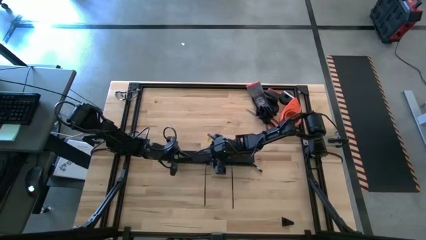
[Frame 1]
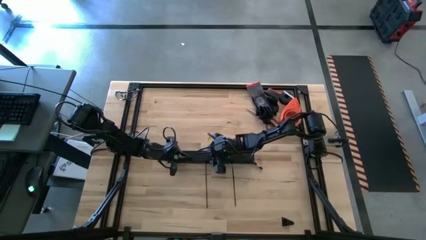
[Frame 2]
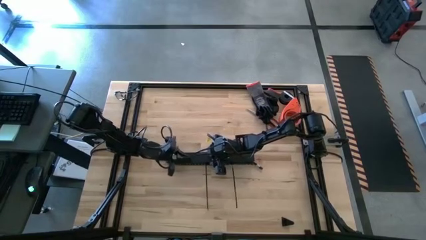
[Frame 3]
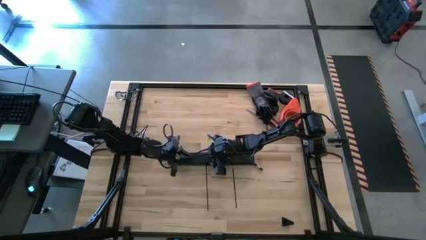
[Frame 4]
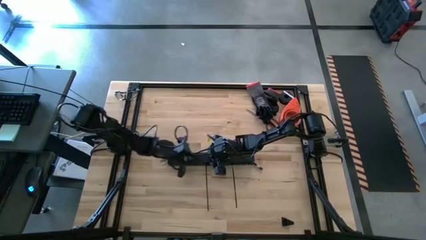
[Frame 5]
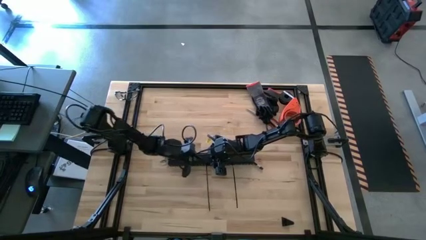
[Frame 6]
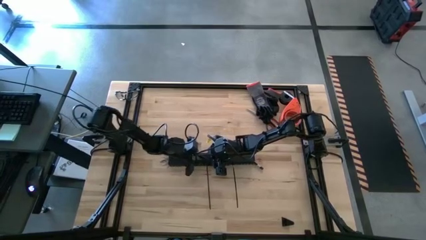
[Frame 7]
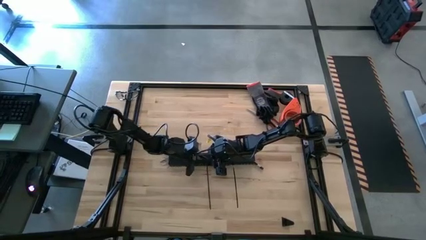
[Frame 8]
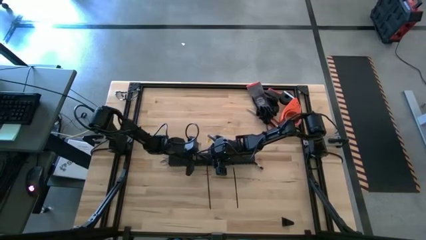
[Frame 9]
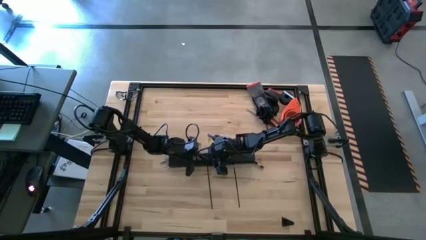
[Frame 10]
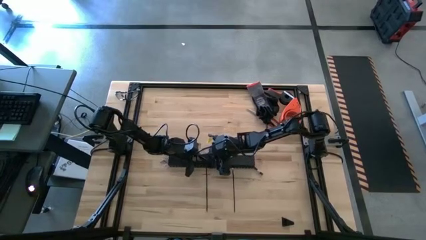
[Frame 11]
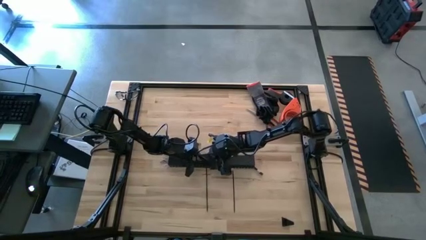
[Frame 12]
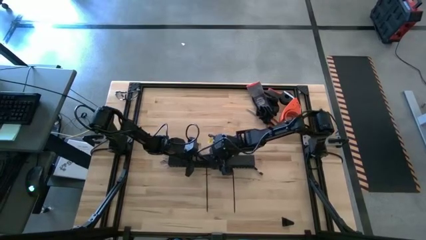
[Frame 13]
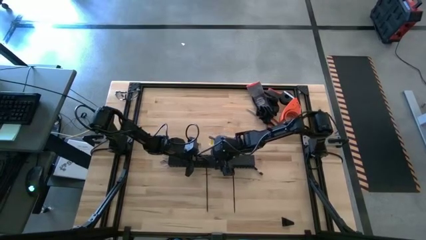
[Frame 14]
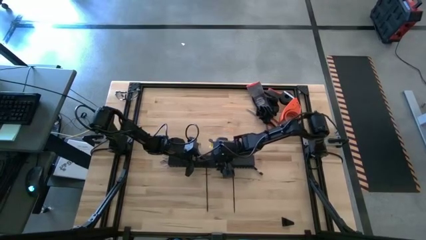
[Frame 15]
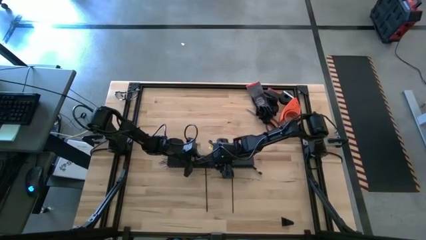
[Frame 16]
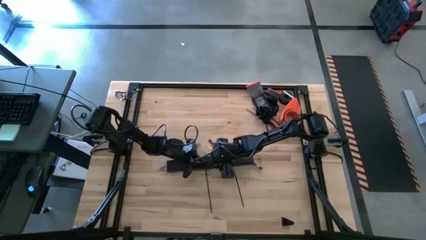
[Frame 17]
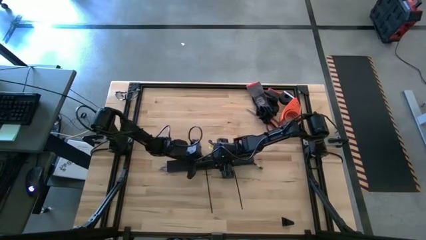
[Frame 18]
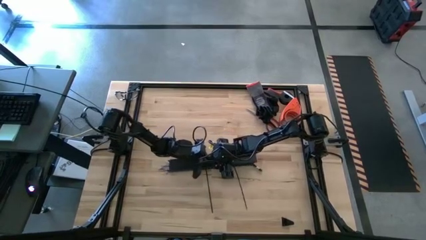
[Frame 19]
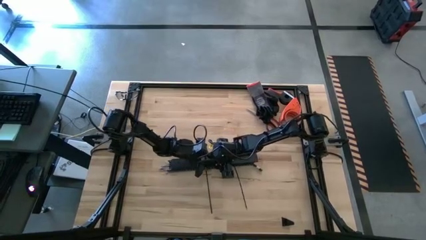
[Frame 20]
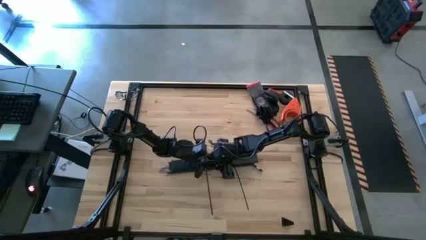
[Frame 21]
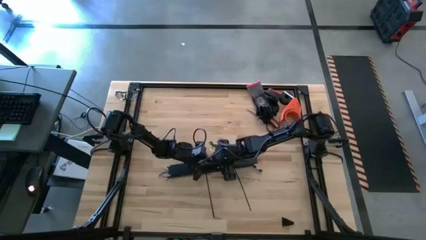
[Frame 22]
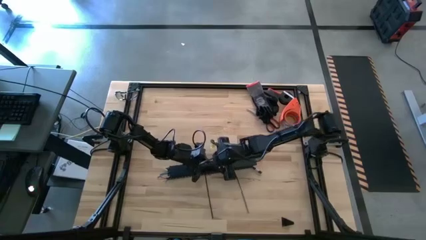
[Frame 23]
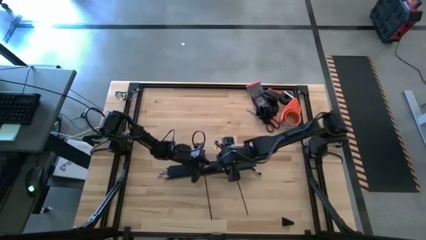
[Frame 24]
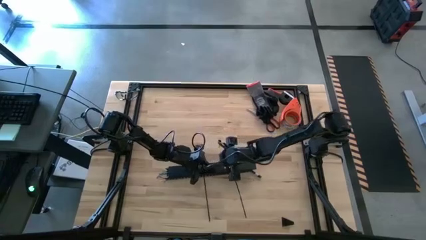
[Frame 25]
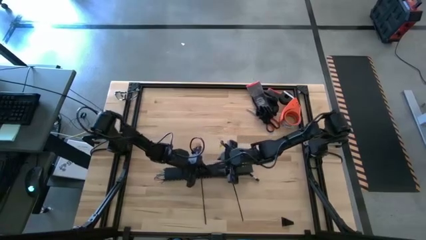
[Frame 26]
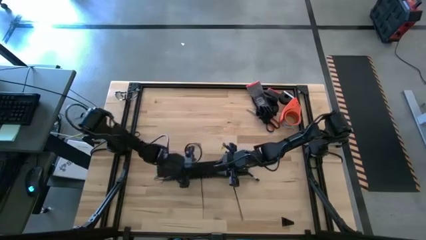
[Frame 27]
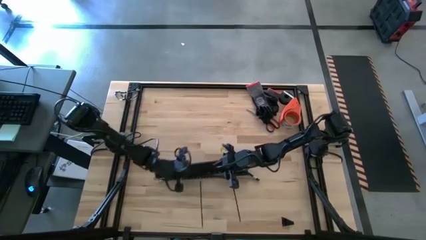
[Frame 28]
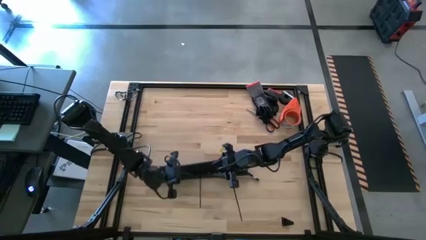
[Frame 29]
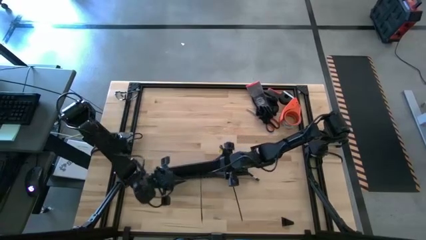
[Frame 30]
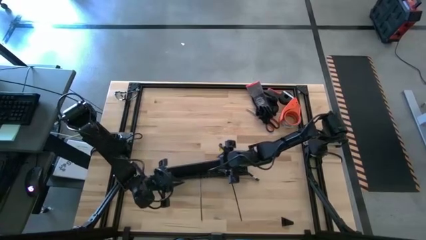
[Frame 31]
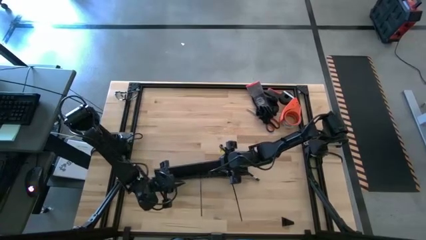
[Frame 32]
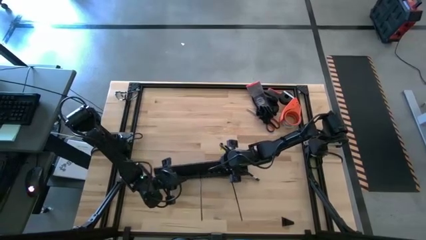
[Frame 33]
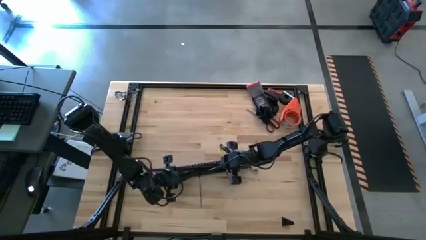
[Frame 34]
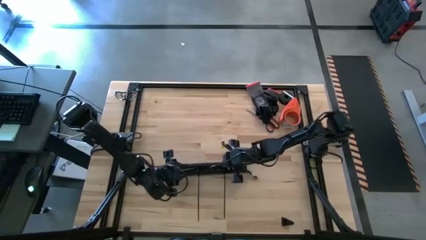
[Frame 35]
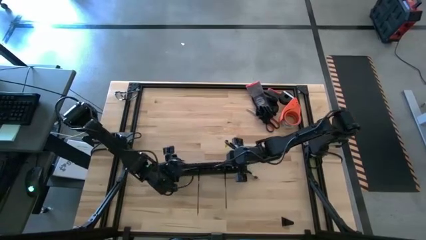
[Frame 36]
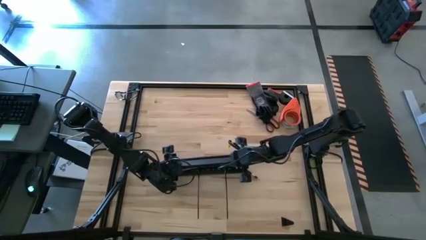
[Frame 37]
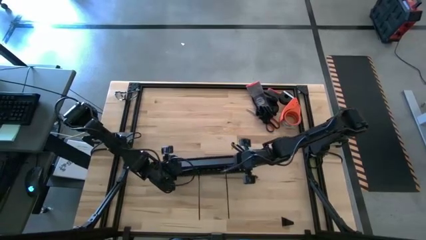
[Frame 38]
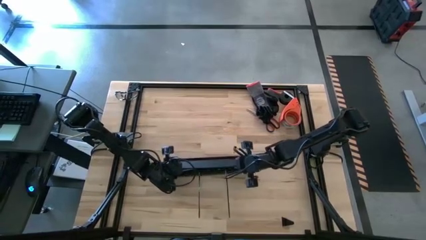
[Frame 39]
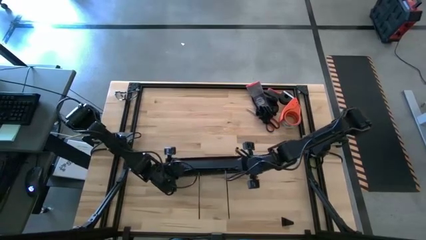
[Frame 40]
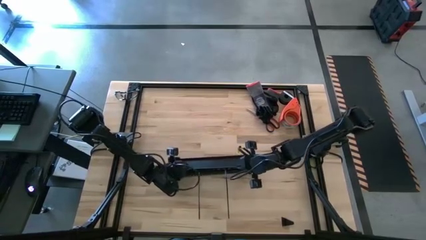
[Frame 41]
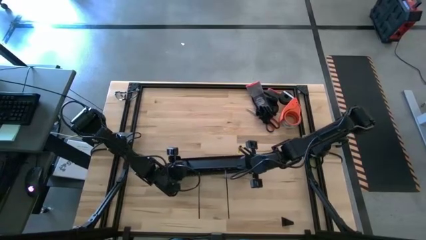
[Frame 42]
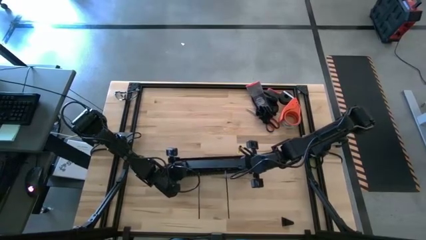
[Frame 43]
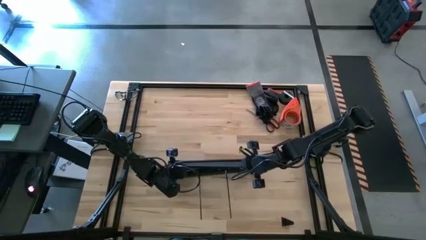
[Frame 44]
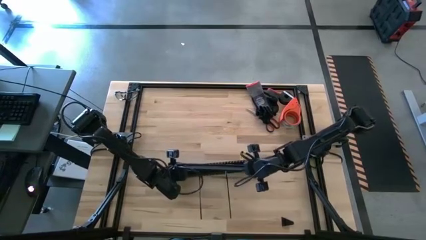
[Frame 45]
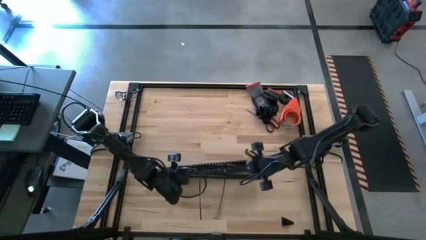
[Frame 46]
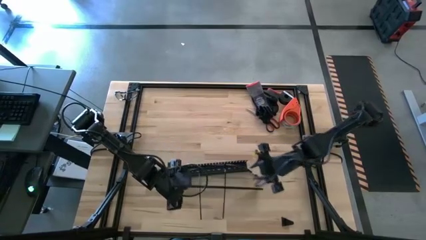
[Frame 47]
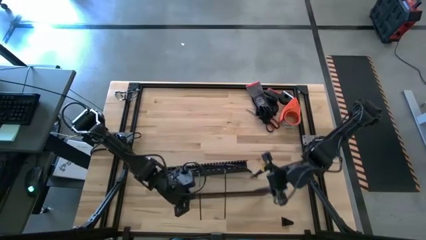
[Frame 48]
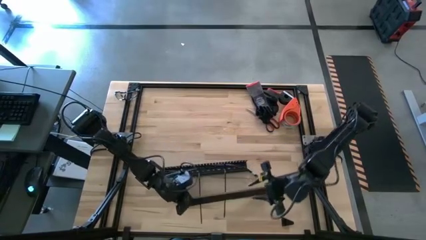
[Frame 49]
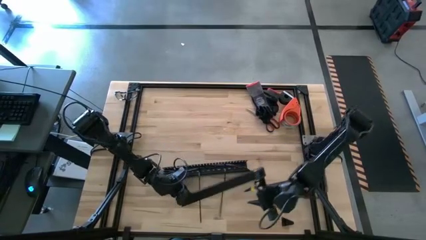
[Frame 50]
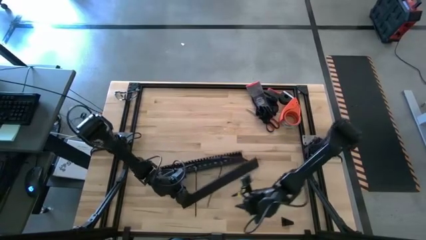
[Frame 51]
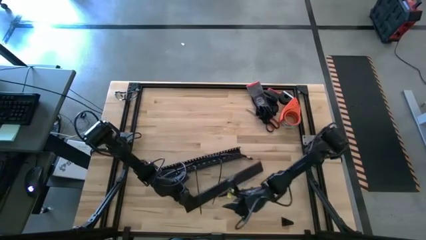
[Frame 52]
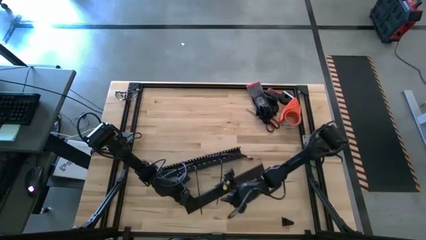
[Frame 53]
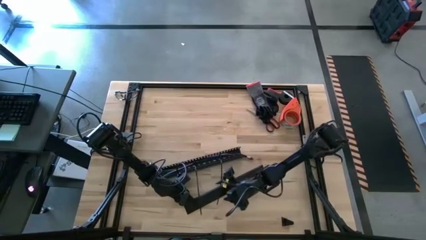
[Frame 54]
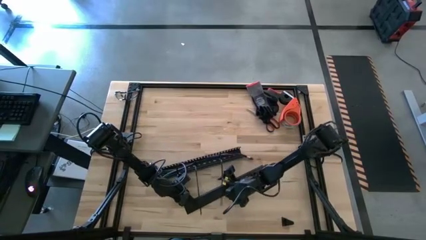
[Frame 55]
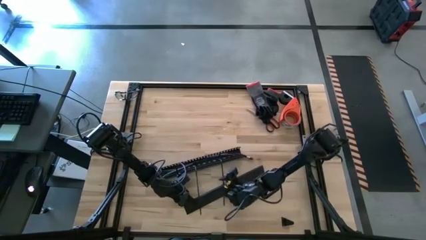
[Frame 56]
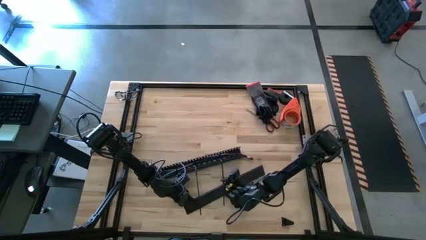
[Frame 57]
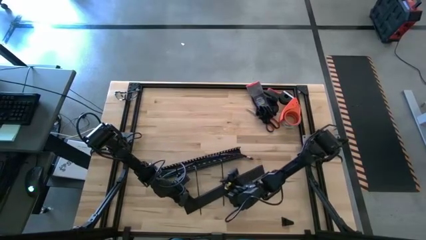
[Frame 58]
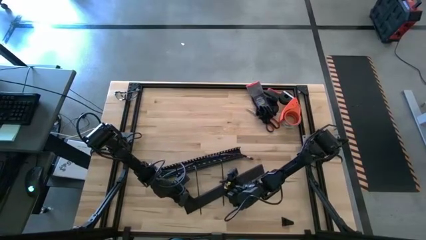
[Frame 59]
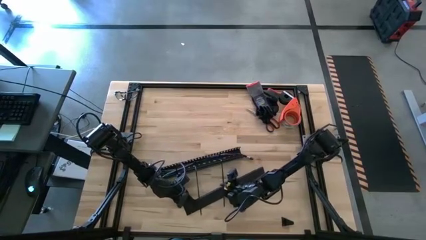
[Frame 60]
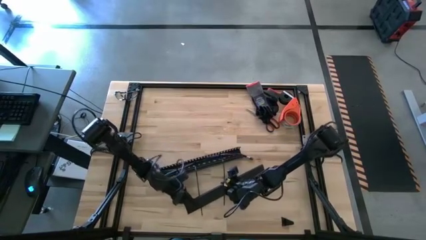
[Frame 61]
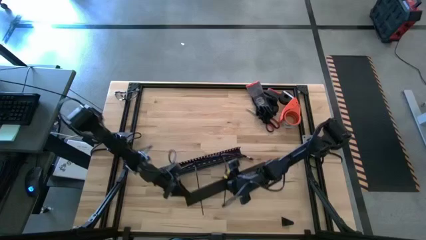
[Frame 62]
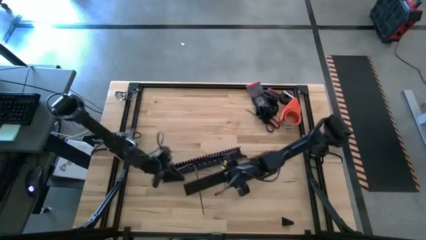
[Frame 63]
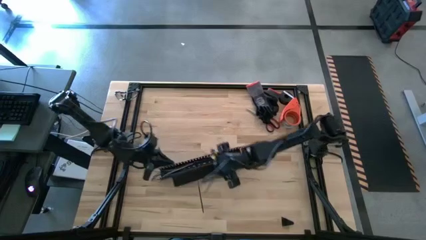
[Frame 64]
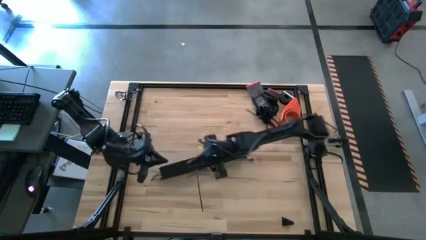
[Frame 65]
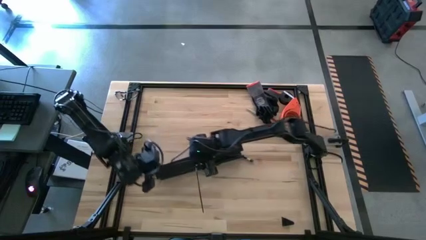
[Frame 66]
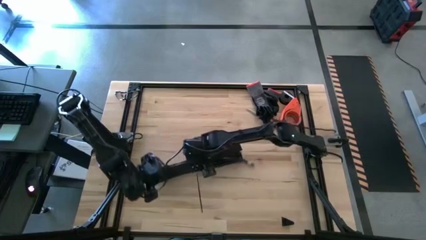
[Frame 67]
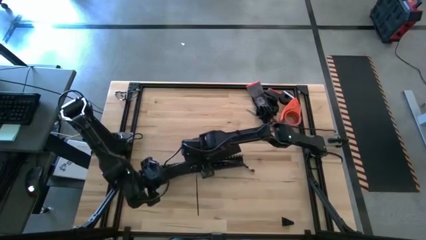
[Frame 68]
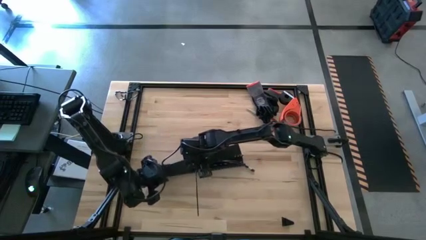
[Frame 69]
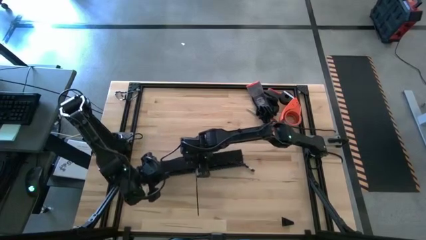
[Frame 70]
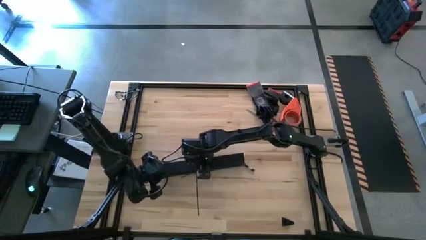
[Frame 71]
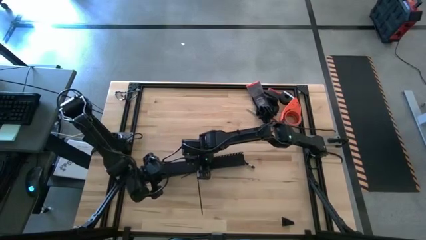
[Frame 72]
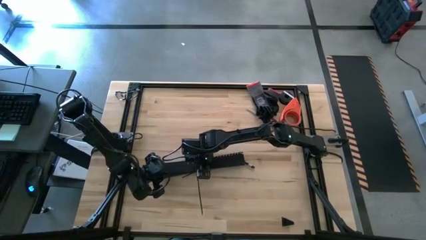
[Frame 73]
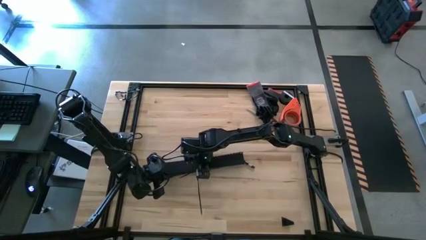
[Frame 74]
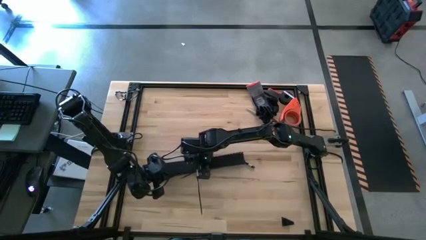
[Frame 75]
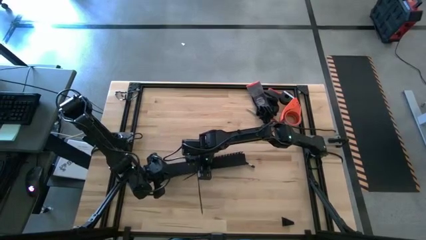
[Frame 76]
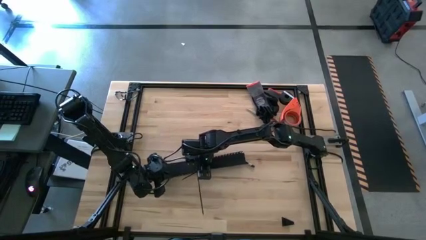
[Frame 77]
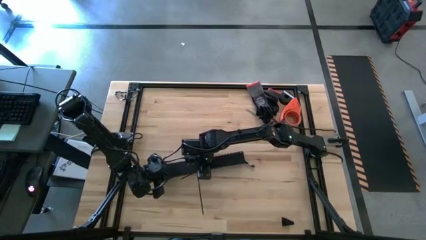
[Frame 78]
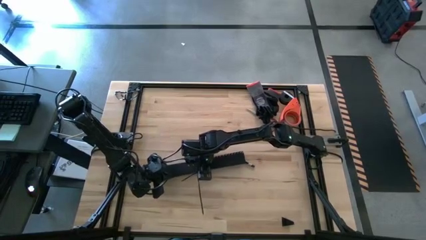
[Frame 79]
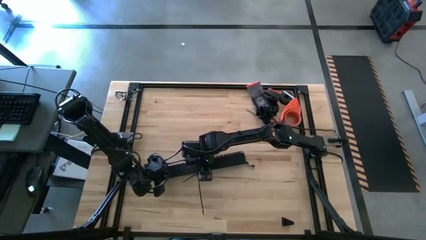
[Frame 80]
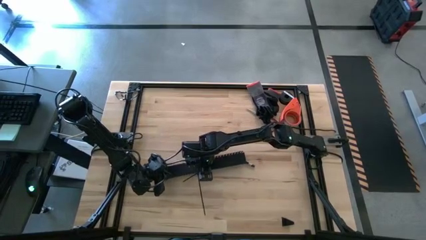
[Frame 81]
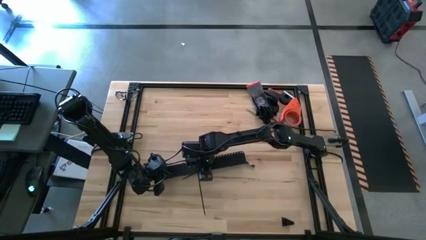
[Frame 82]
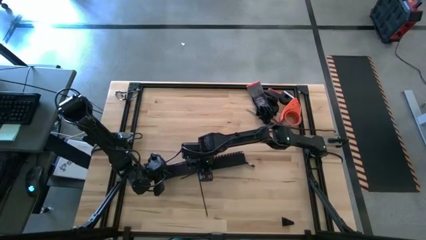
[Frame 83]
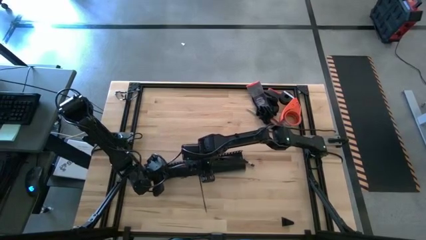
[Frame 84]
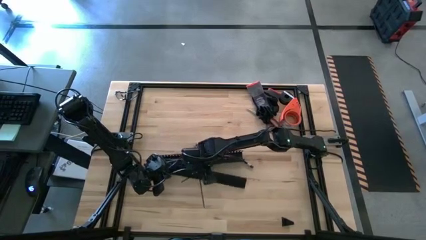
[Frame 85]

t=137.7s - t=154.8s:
Task: Ziptie cables
Close the black cable duct
